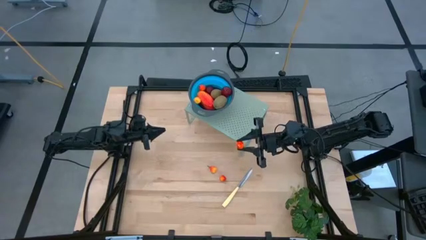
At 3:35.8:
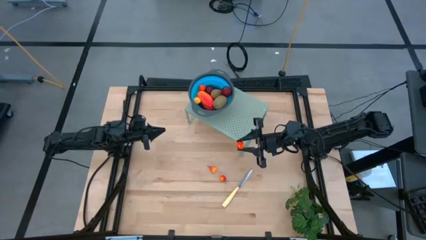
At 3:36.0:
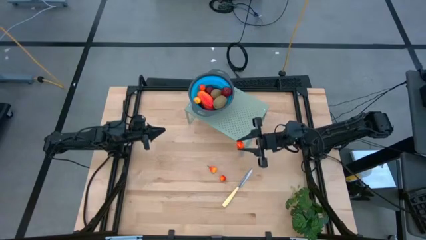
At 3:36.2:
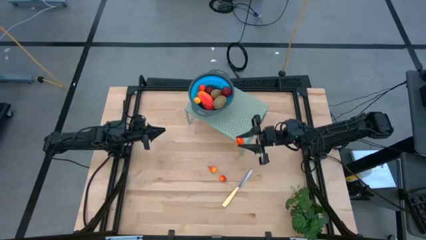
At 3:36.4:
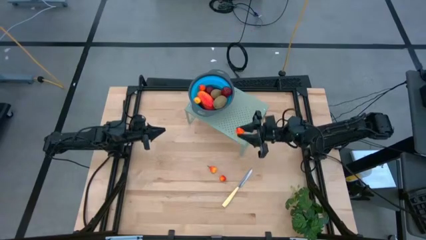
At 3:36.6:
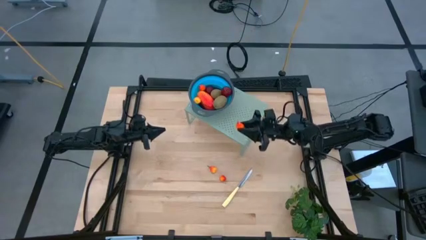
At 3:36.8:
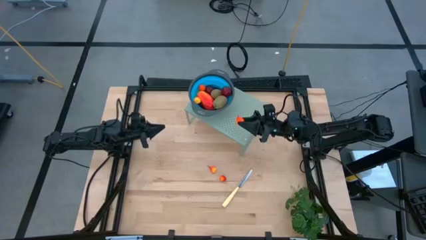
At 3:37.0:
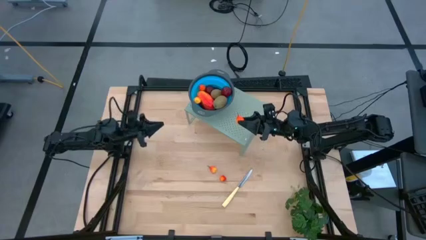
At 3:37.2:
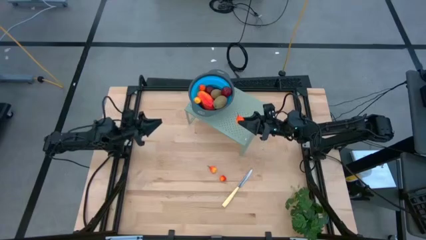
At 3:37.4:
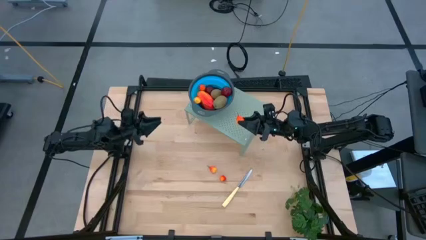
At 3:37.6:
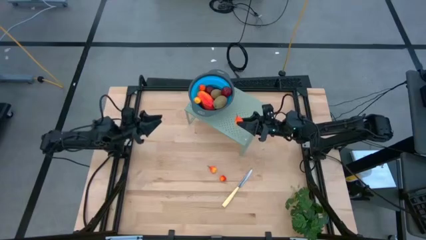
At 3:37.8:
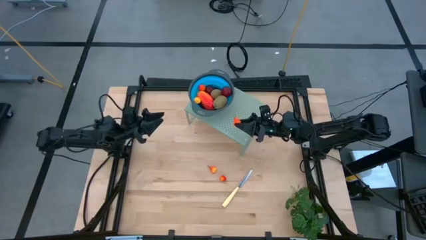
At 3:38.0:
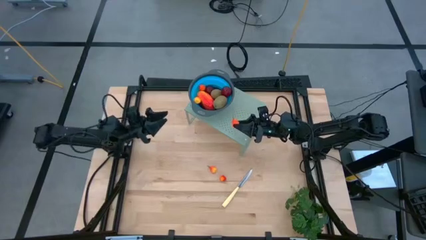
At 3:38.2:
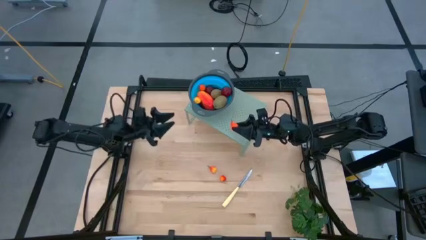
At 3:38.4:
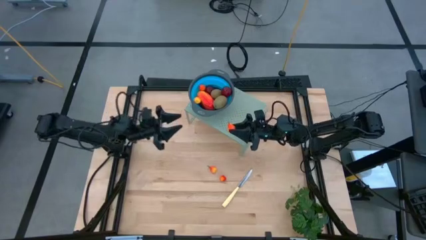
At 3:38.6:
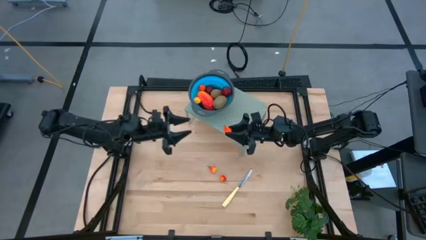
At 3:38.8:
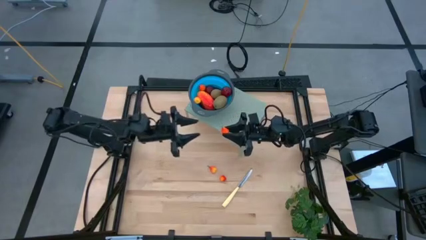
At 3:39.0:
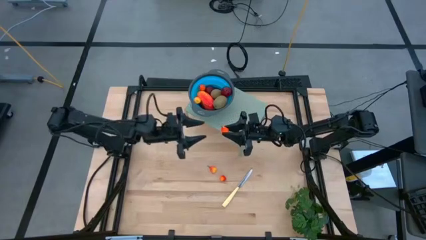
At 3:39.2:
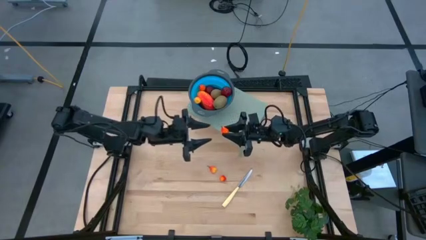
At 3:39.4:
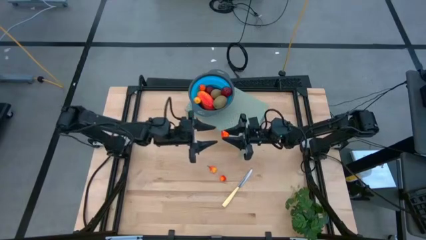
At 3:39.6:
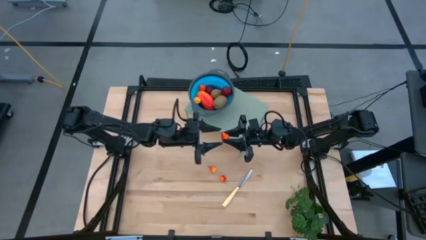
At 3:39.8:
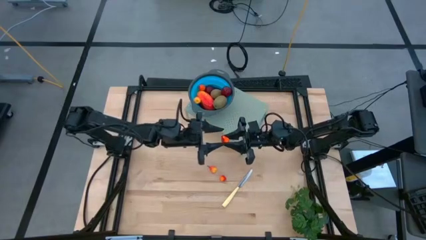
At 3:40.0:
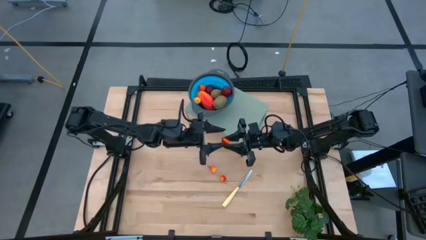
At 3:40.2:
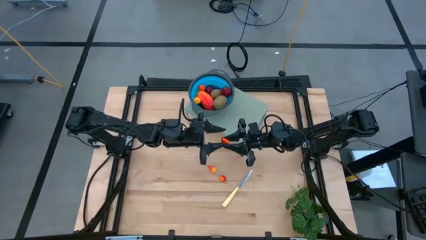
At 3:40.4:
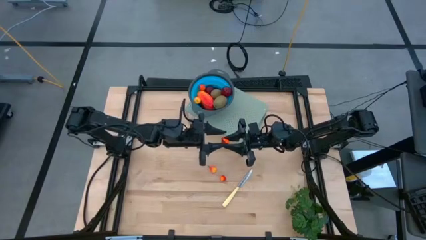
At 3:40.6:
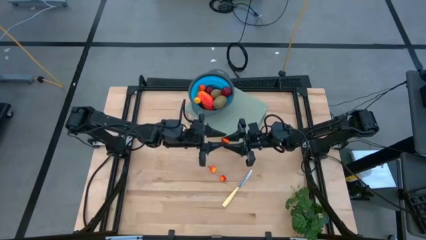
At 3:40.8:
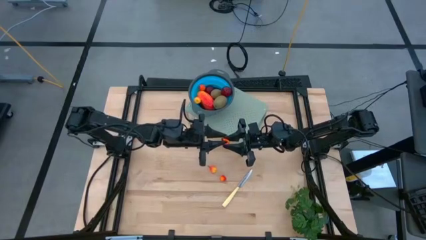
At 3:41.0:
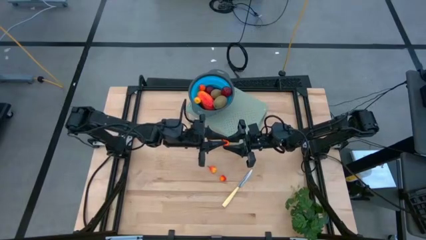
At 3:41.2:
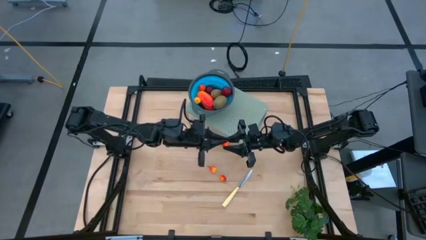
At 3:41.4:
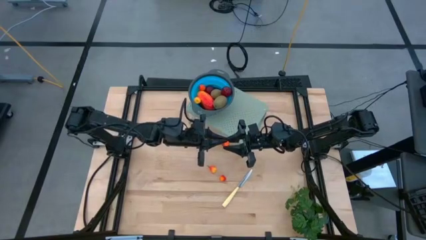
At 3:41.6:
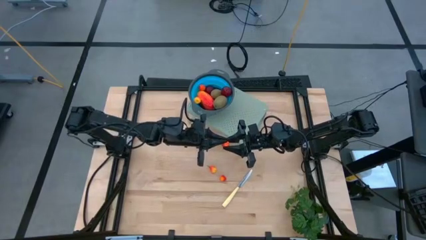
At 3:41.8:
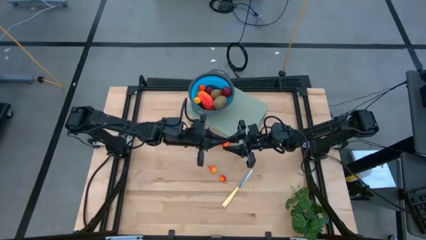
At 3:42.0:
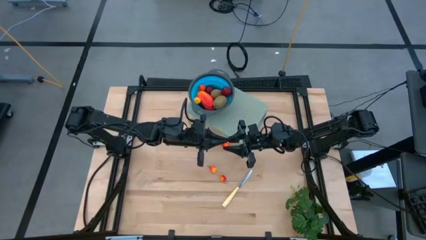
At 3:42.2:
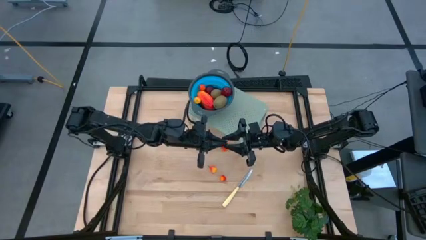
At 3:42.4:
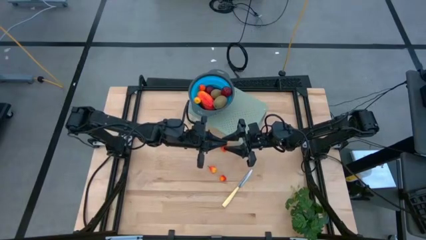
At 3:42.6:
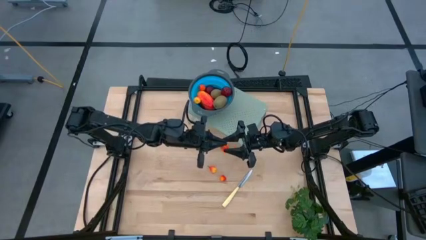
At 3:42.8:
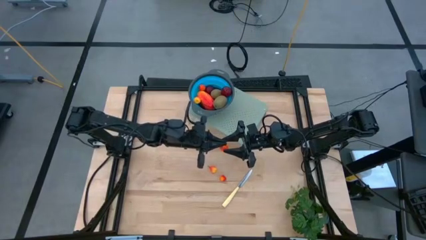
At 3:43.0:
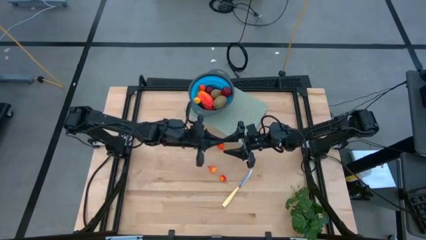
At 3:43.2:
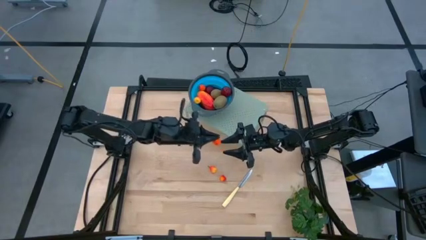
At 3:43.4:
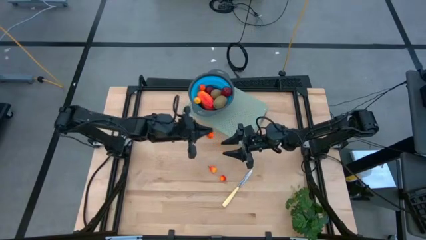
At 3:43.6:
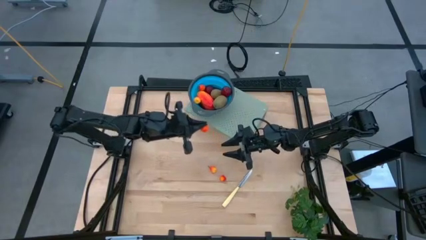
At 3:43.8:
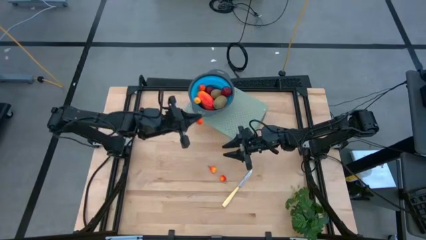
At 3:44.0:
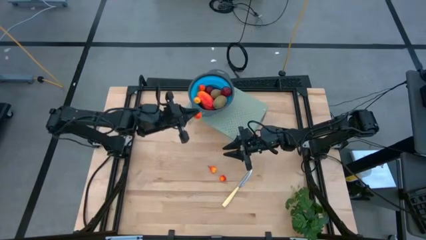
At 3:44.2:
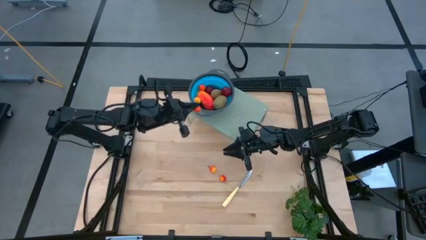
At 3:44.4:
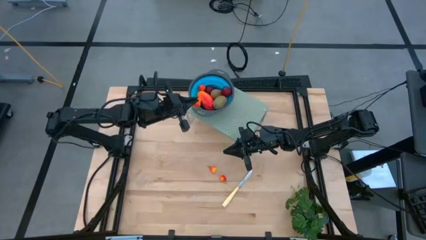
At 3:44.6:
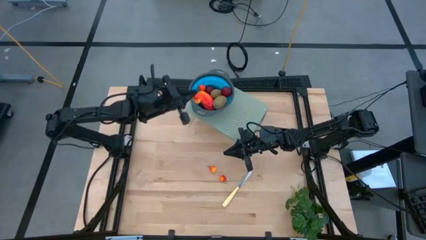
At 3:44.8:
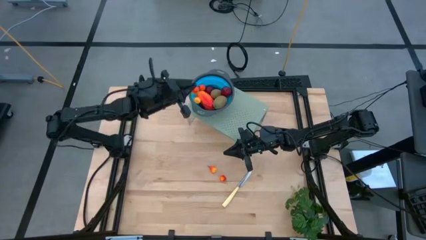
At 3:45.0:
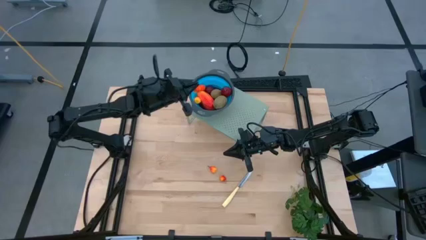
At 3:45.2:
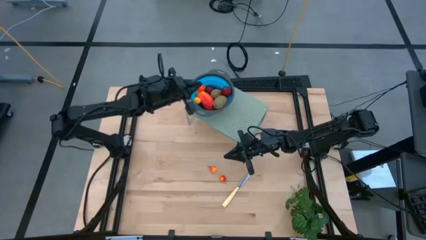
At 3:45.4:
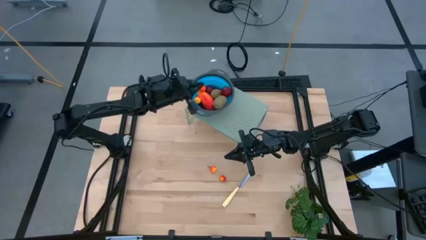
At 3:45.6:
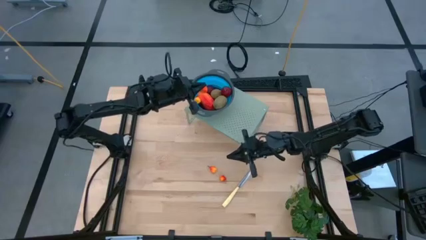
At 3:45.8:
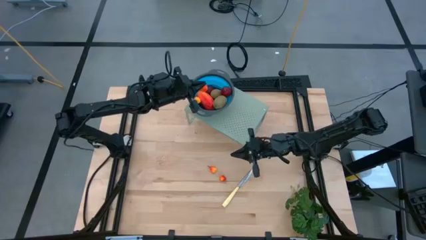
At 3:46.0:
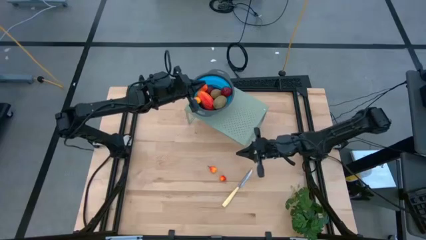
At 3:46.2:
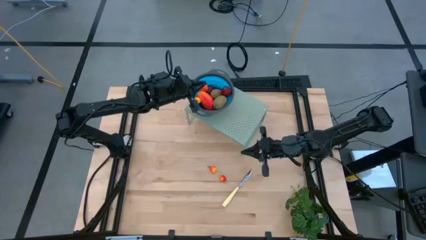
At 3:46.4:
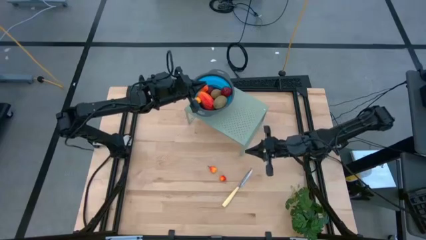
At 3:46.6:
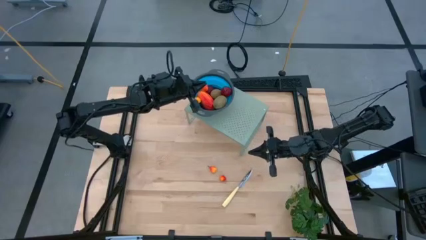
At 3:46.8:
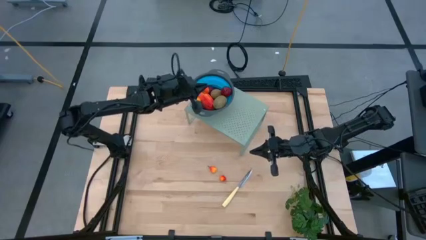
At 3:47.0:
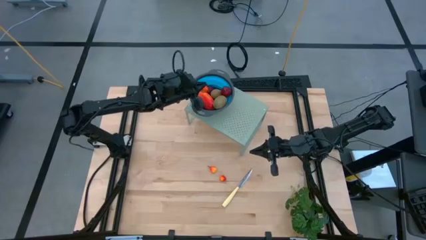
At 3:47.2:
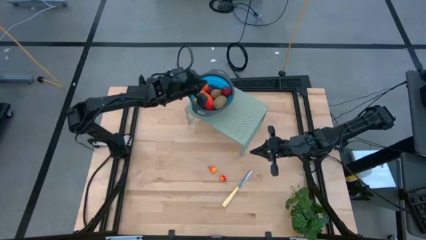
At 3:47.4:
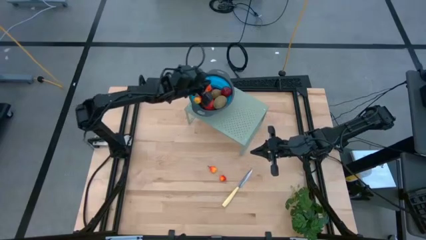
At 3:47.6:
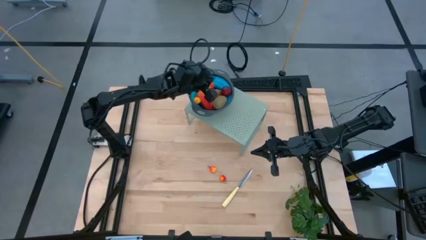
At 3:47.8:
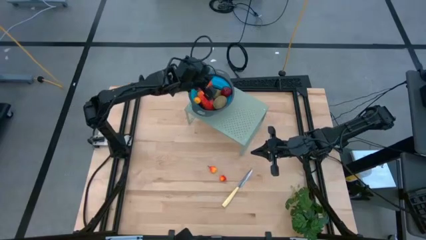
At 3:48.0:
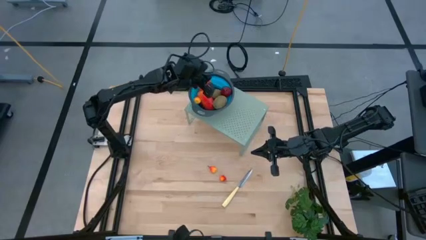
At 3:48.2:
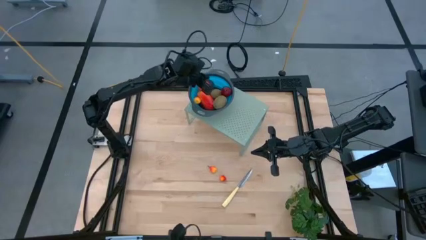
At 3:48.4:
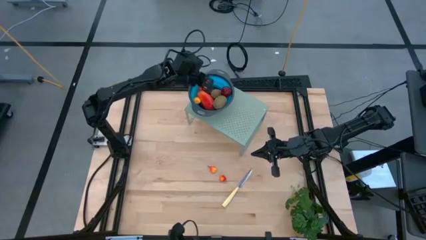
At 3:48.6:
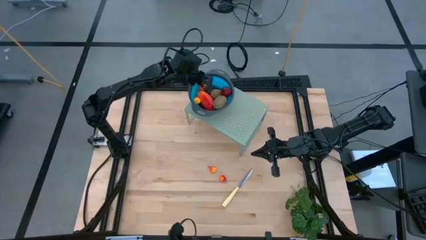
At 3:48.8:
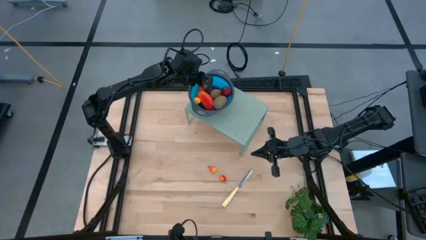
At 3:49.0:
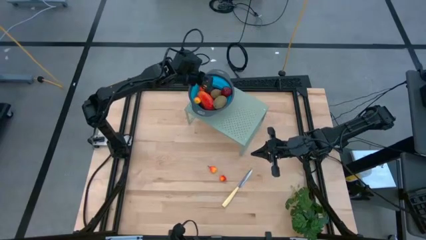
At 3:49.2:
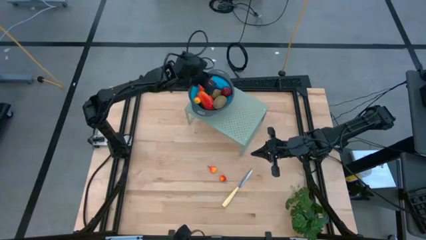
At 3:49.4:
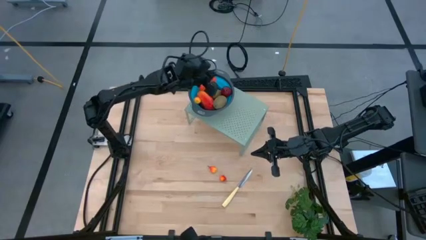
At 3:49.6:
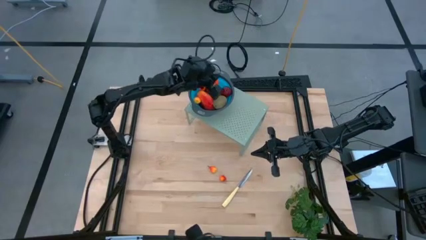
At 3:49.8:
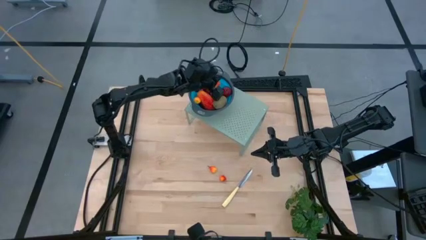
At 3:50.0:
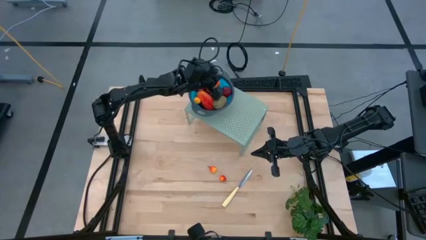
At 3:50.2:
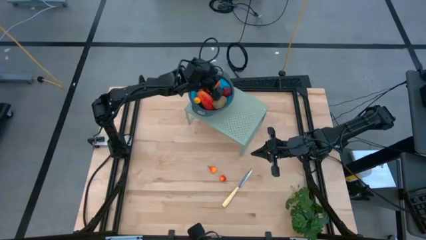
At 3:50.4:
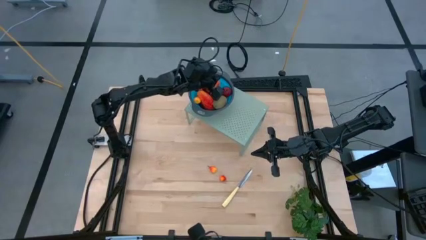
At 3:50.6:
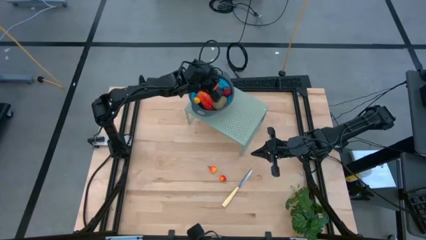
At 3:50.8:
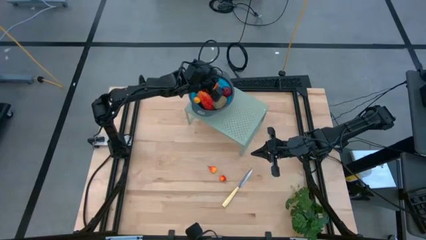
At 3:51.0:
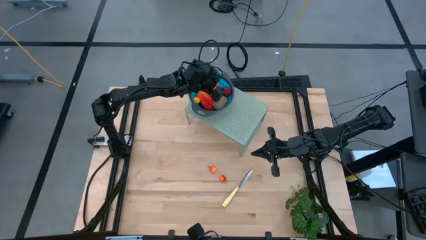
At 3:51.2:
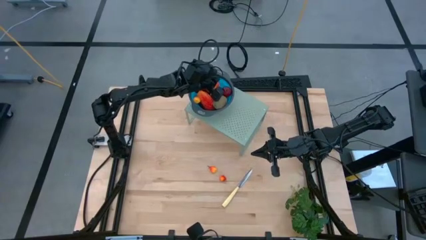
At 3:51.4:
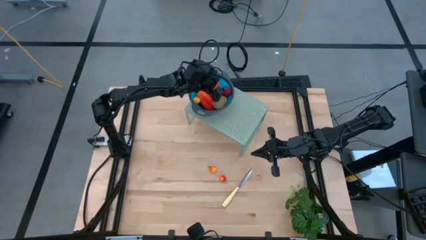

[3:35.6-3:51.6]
Task: Pick & Place Fruit
Put the peach into the blue strainer bowl on the shelf
